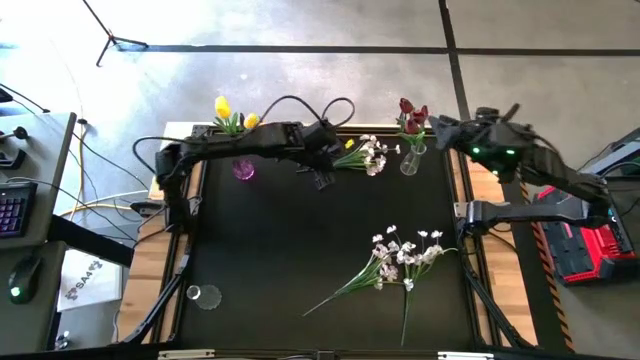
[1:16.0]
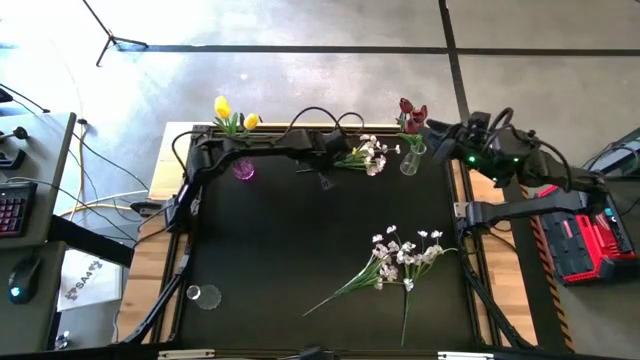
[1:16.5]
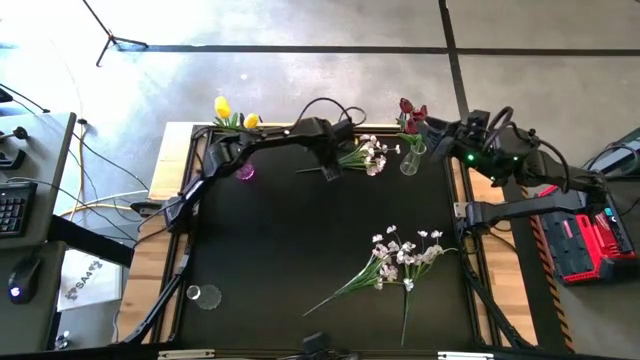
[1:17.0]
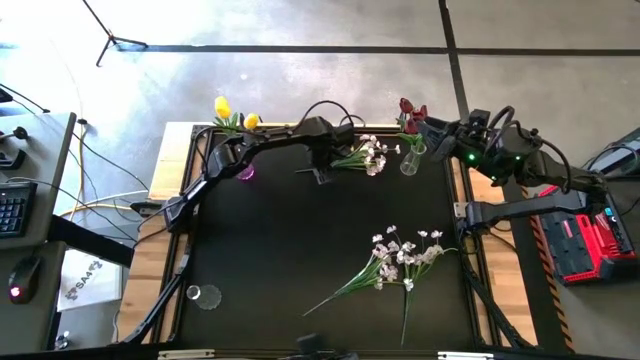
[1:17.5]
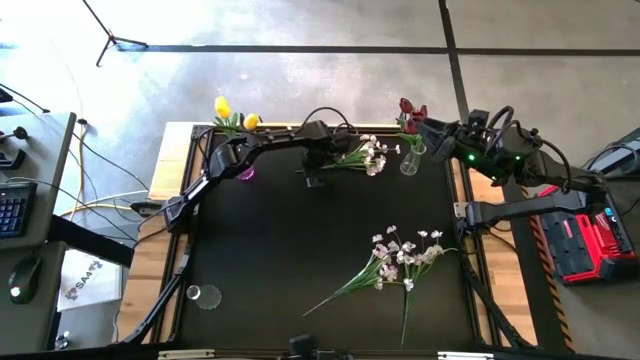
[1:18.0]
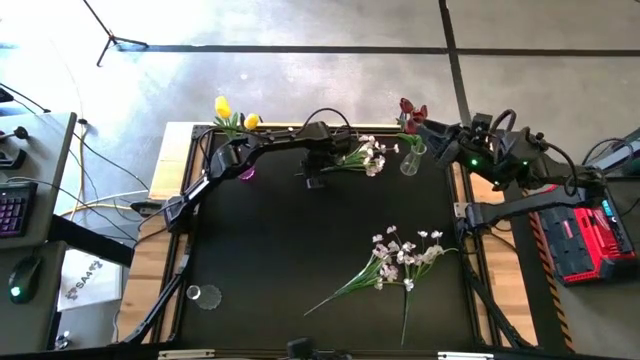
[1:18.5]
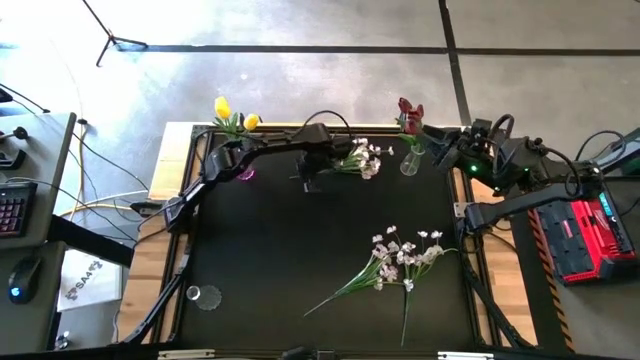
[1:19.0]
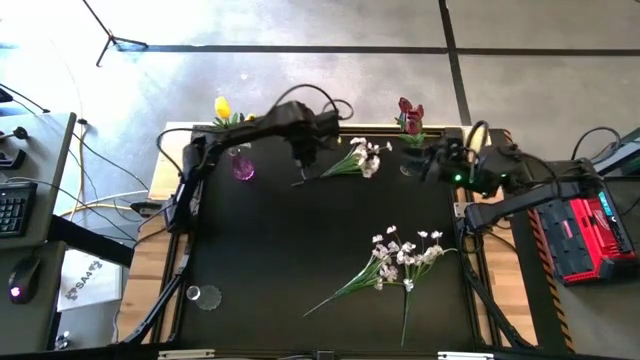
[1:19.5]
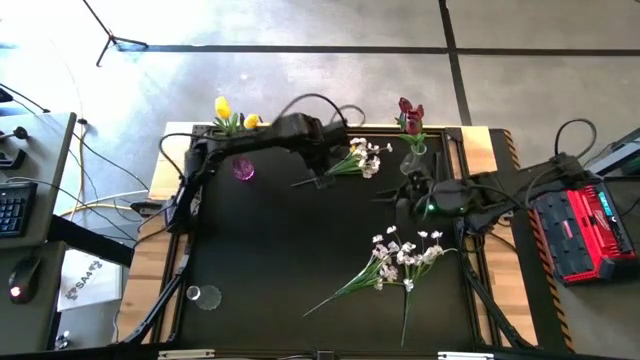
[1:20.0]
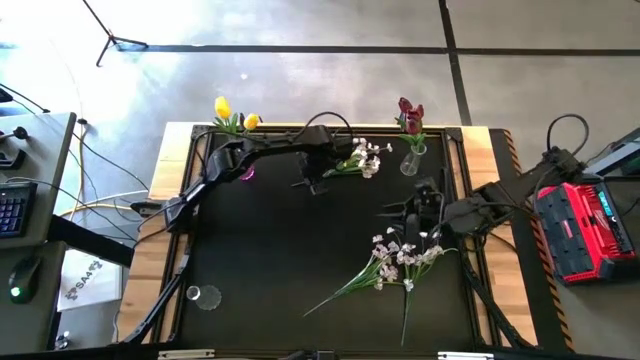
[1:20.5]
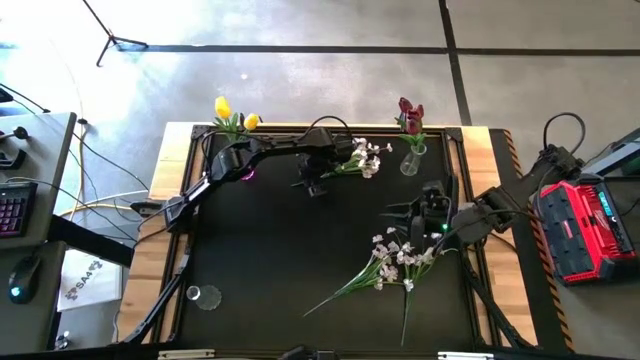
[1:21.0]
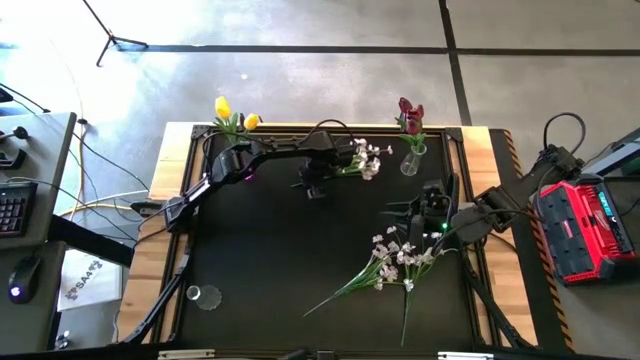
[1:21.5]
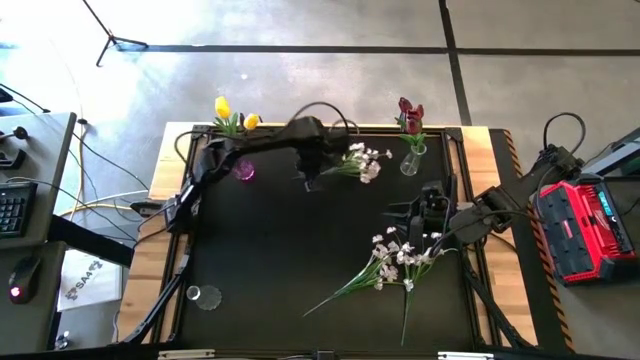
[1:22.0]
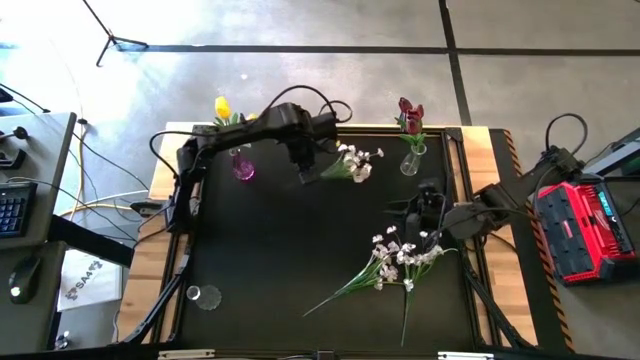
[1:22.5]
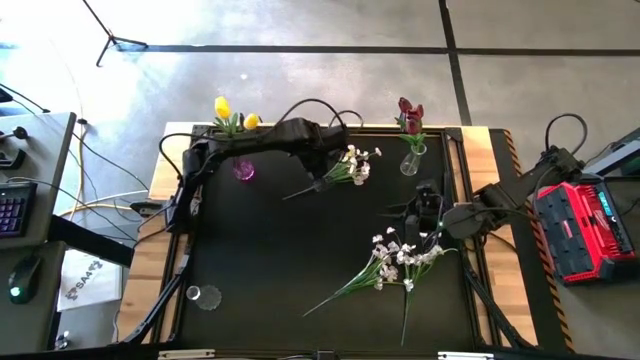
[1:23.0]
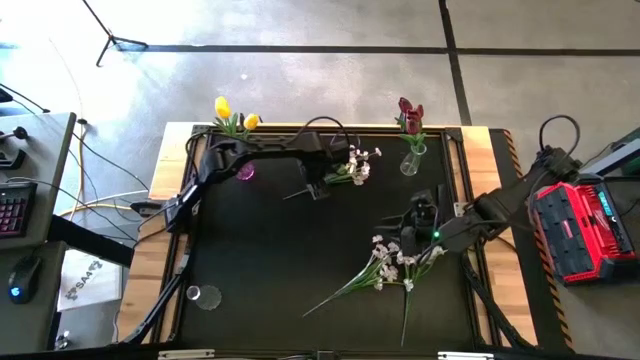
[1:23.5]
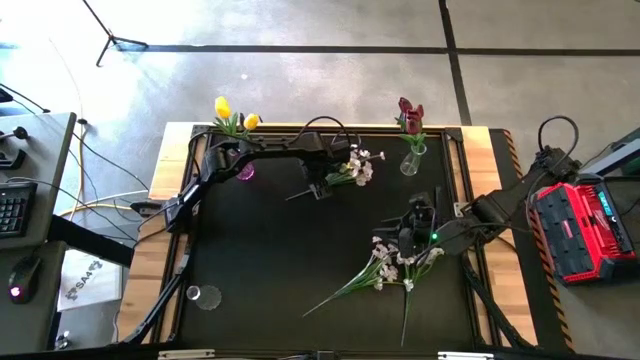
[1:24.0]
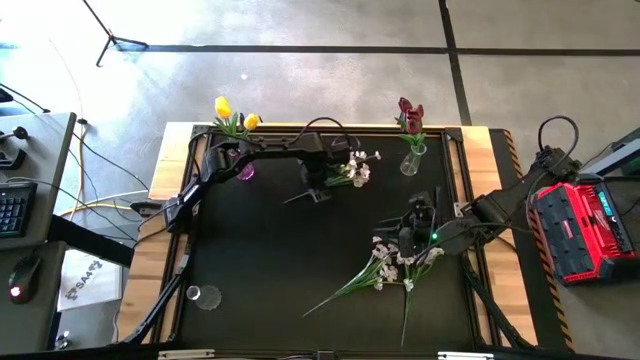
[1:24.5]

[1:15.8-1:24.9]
Task: Sort flowers into vase by color
Put the top white flower into the bottom transparent bin

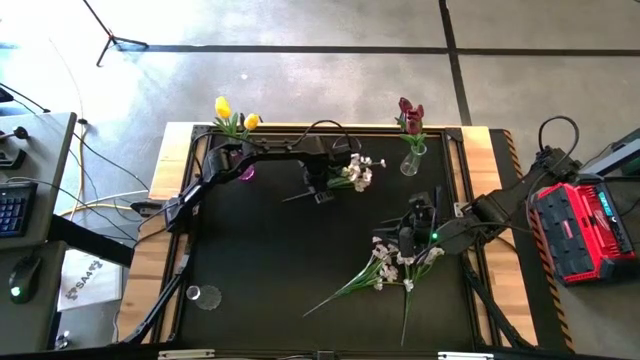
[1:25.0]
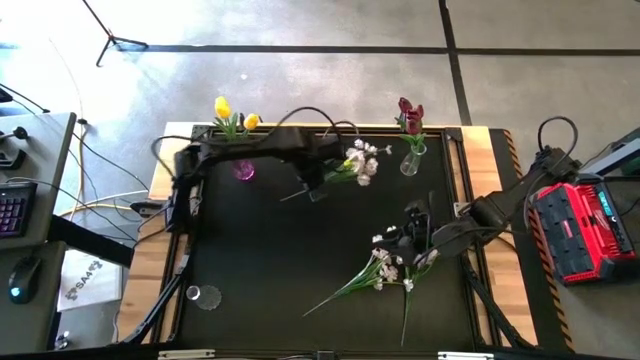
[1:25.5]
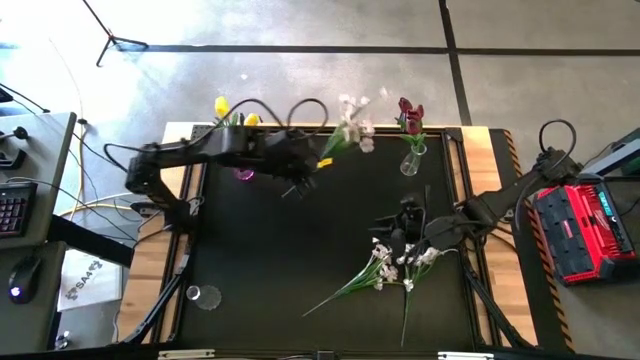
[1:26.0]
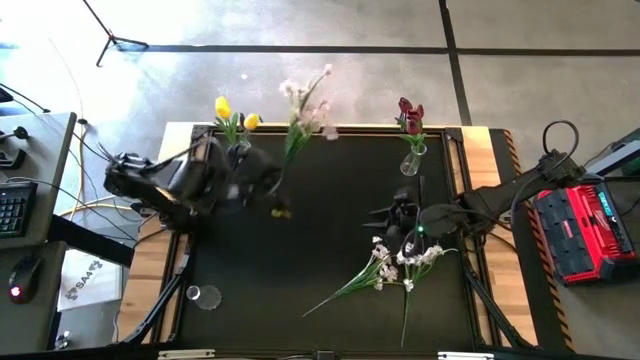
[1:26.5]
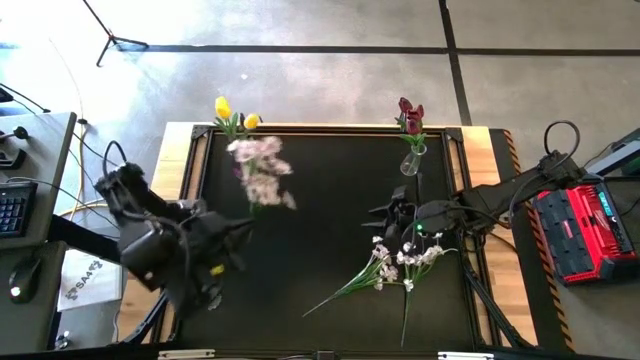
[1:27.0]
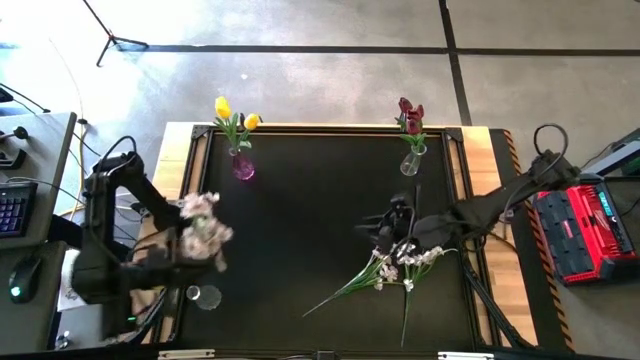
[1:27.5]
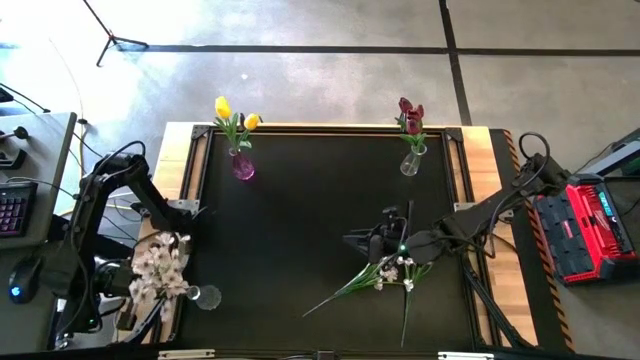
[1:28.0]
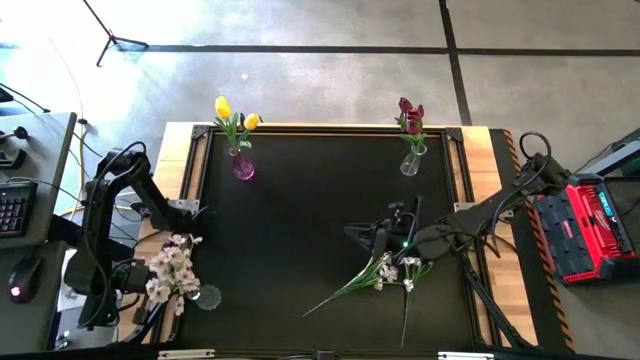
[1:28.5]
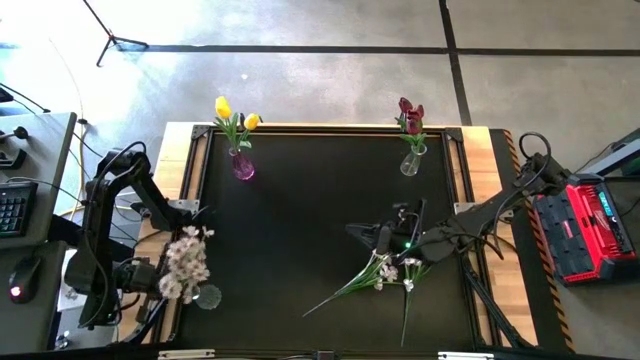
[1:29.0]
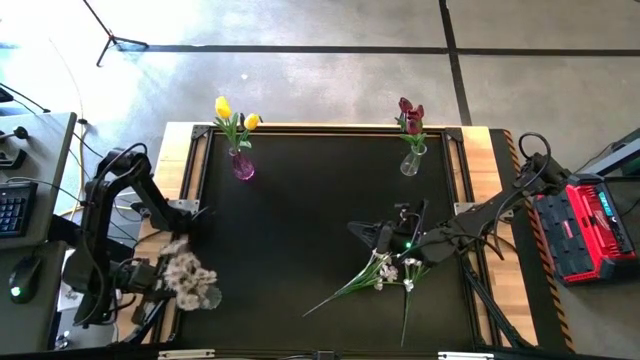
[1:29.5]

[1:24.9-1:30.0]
Put the top white flower into the bottom transparent bin

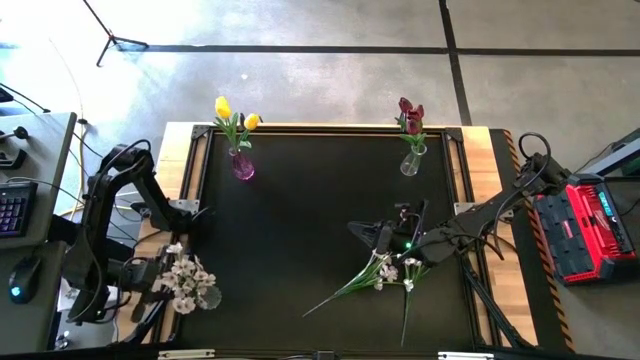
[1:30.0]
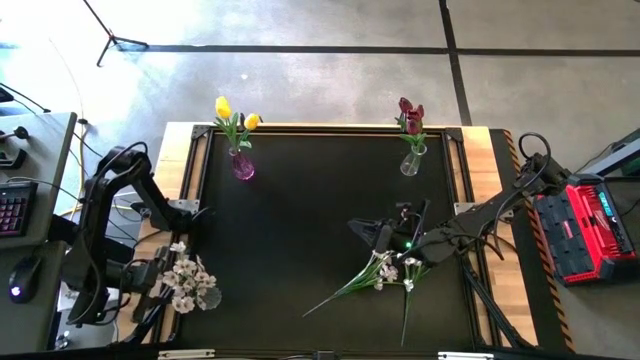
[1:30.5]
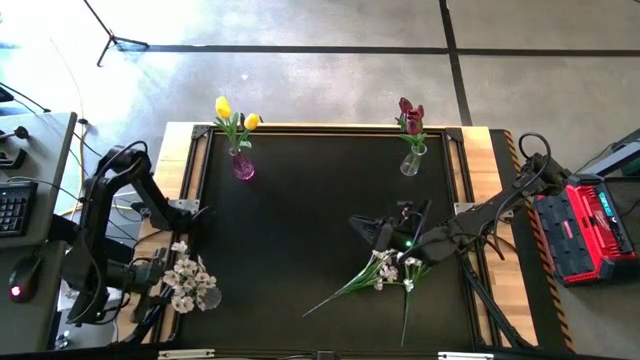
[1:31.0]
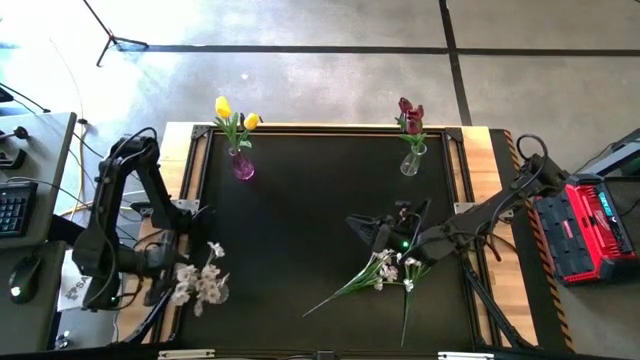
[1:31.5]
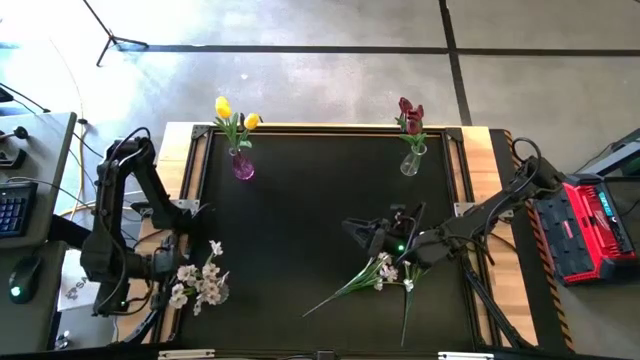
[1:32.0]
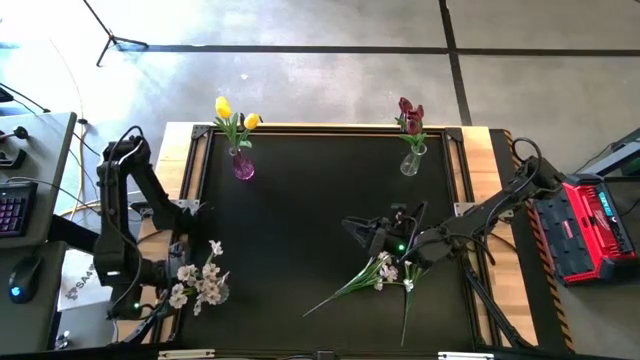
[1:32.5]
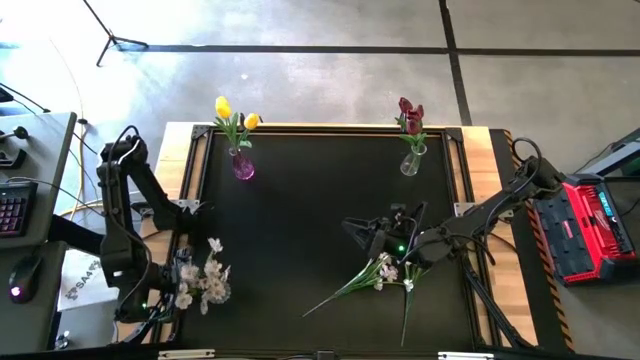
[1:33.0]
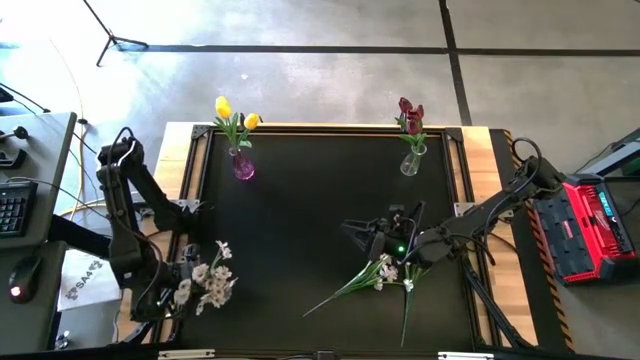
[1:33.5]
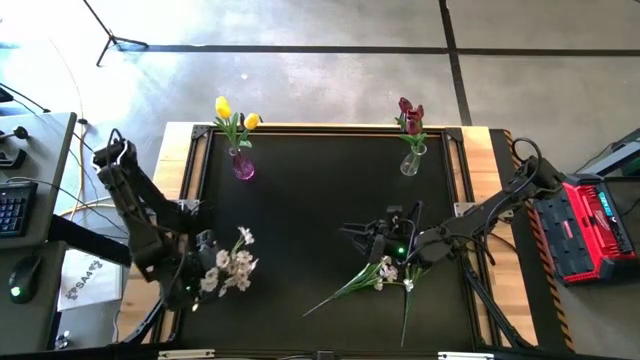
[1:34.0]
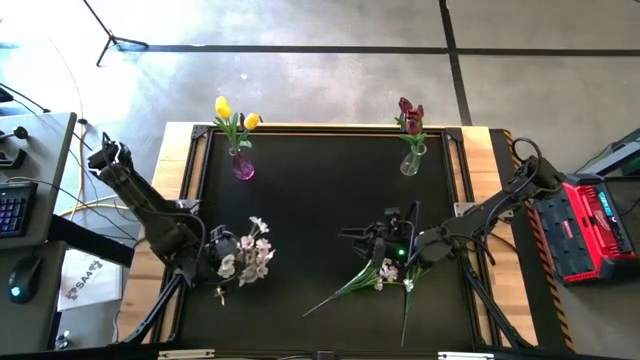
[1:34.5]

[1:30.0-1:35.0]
Move the bottom transparent vase to the middle left of the table

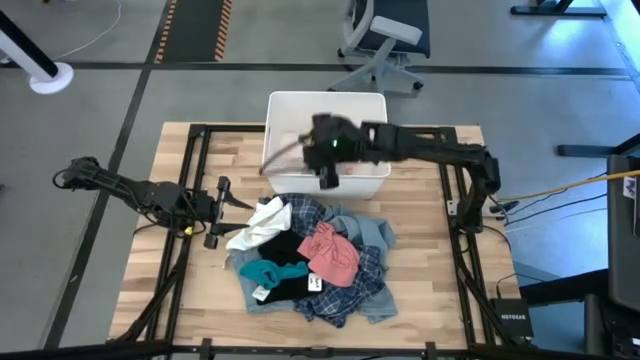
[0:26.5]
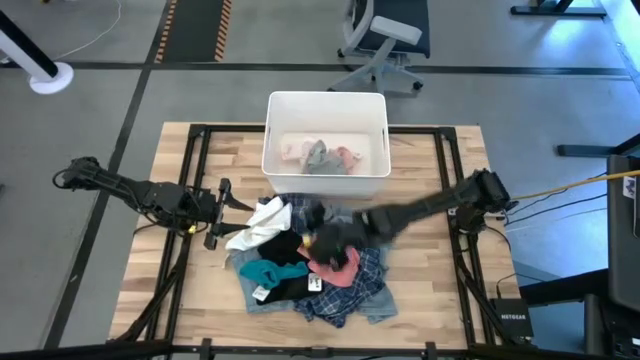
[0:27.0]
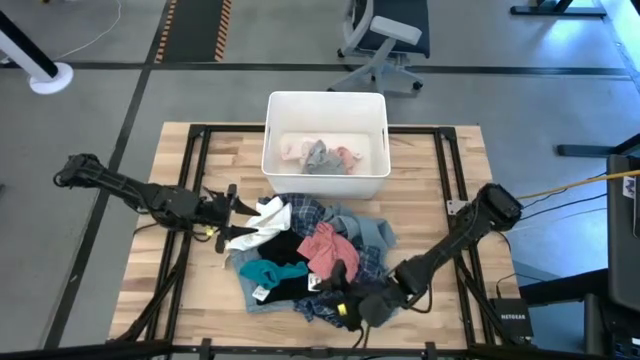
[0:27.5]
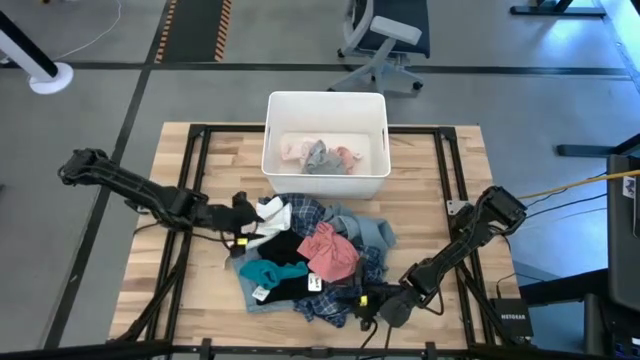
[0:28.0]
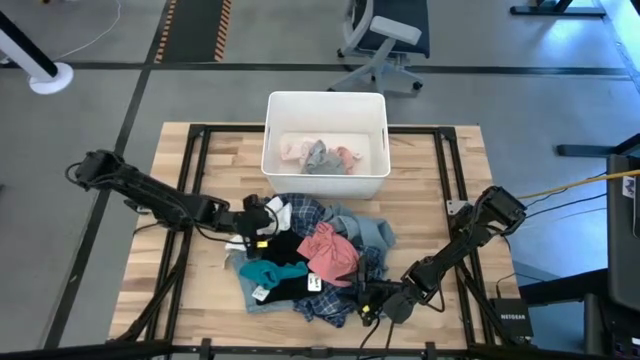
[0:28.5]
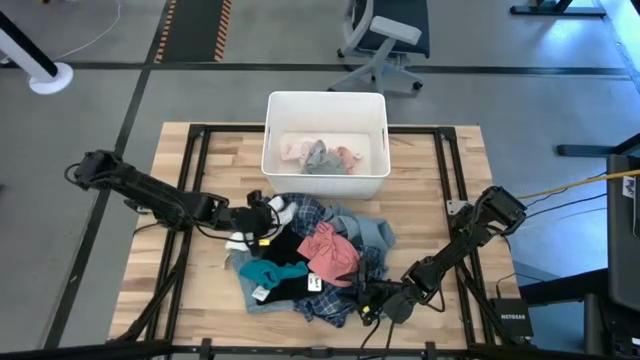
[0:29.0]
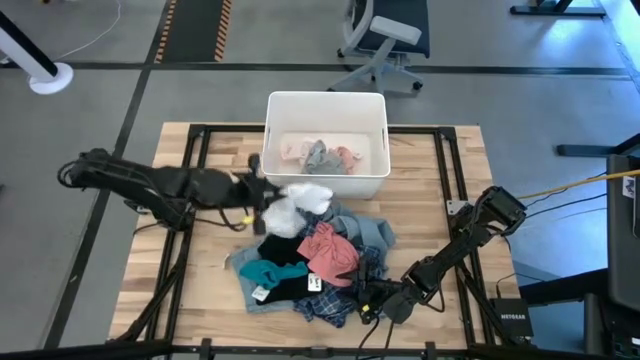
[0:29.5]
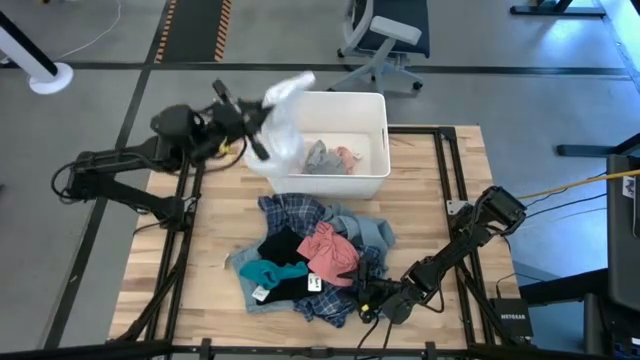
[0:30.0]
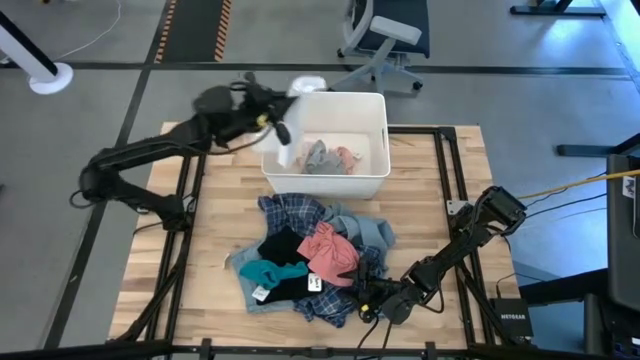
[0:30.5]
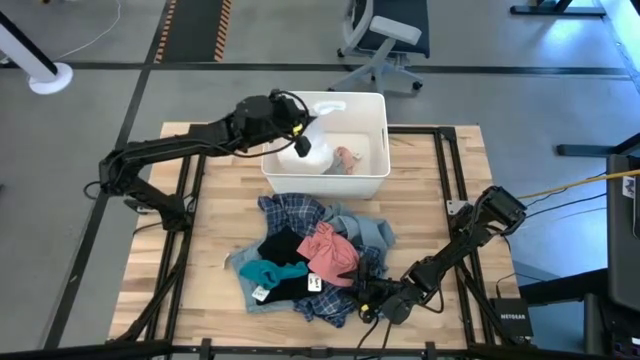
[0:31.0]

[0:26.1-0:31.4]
Task: Sort clothes
Put the white boxer into the white laundry bin
